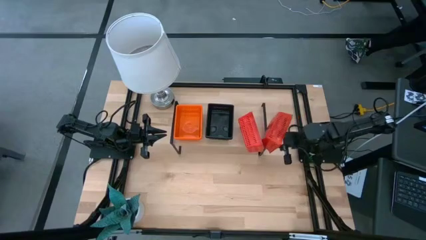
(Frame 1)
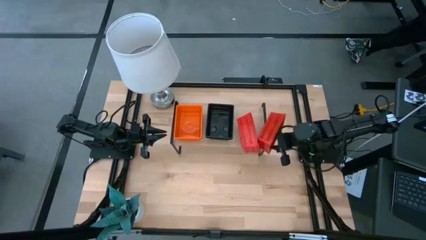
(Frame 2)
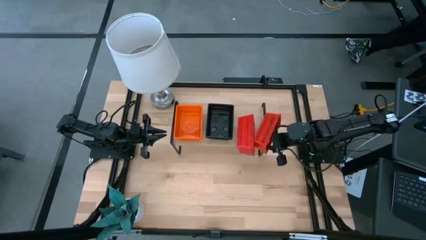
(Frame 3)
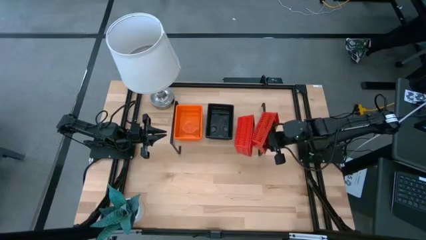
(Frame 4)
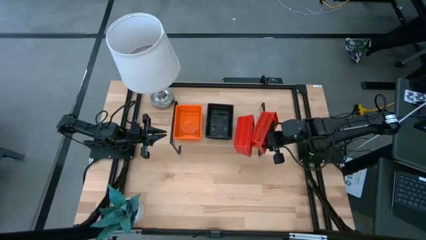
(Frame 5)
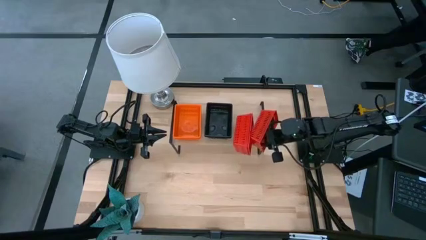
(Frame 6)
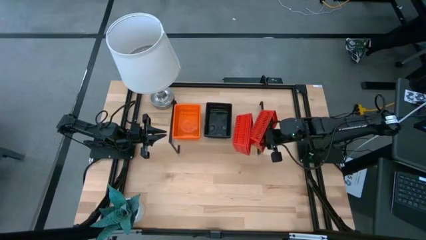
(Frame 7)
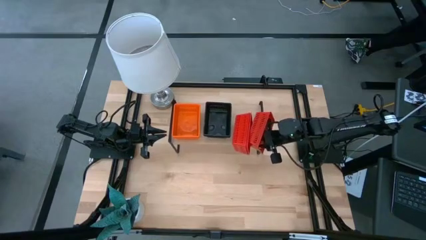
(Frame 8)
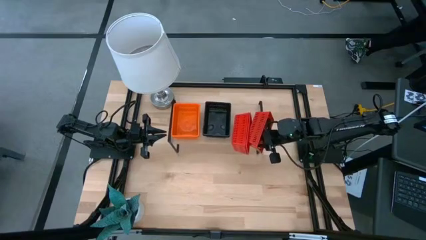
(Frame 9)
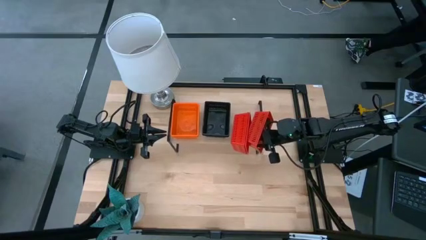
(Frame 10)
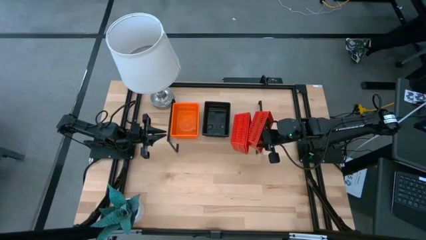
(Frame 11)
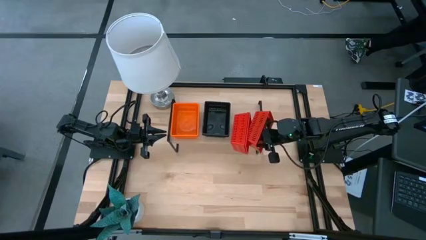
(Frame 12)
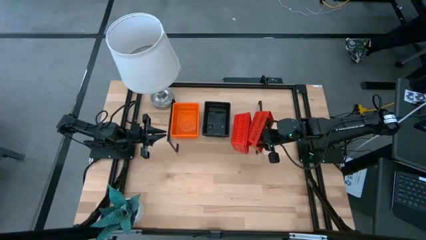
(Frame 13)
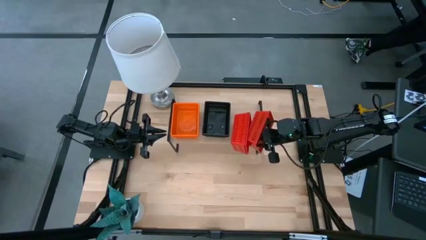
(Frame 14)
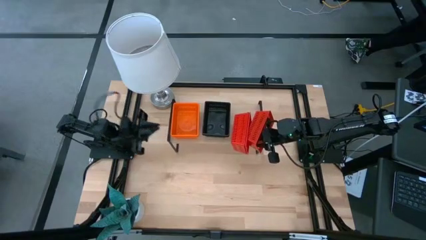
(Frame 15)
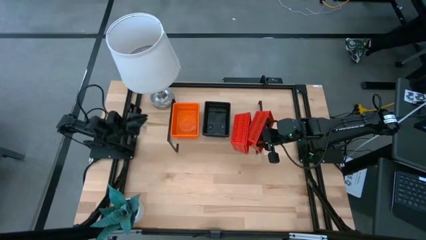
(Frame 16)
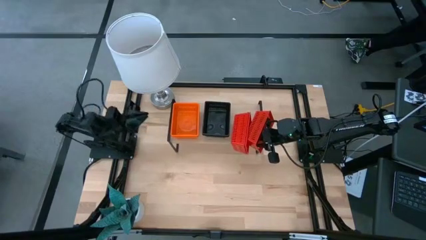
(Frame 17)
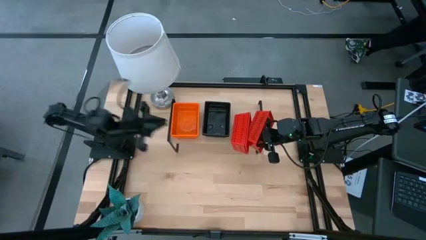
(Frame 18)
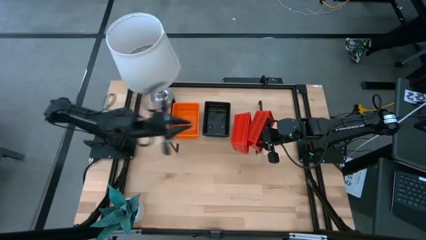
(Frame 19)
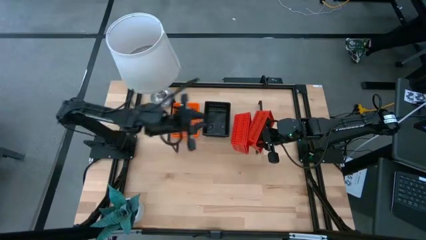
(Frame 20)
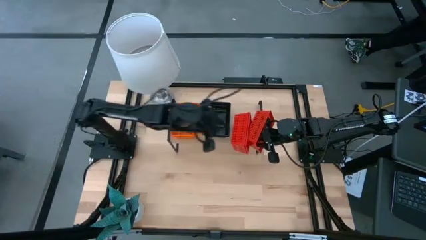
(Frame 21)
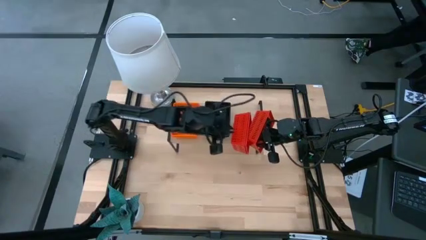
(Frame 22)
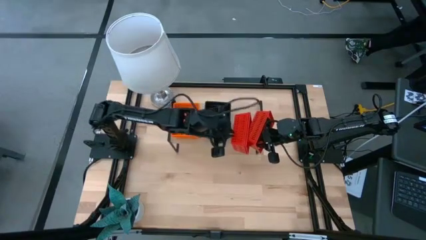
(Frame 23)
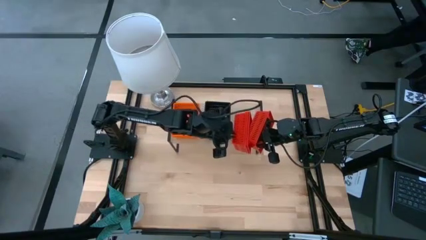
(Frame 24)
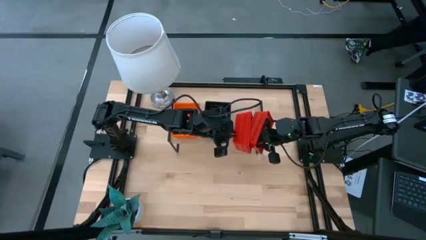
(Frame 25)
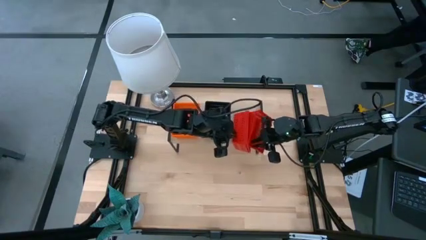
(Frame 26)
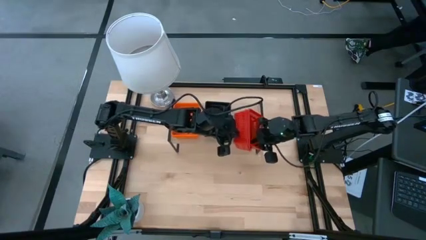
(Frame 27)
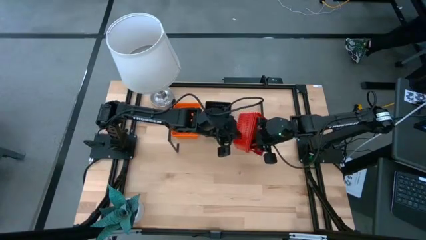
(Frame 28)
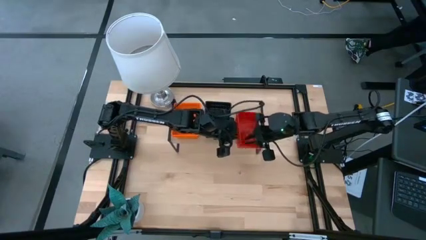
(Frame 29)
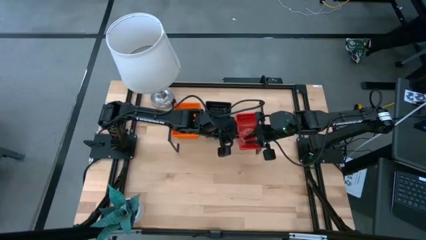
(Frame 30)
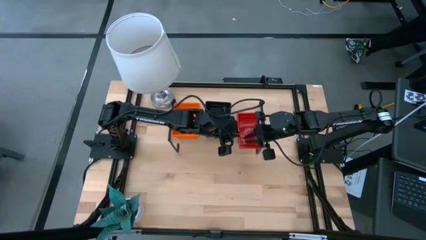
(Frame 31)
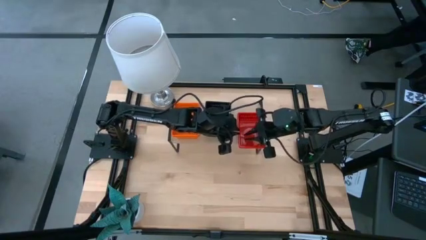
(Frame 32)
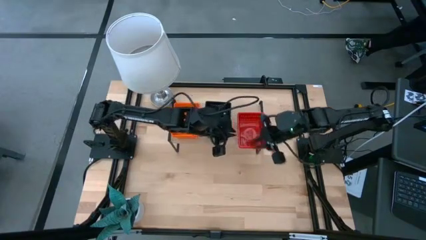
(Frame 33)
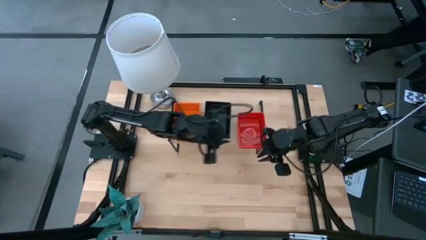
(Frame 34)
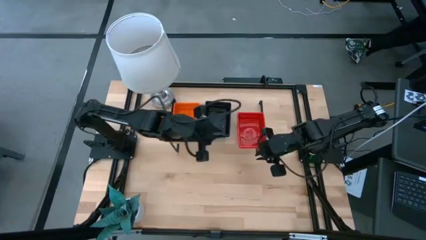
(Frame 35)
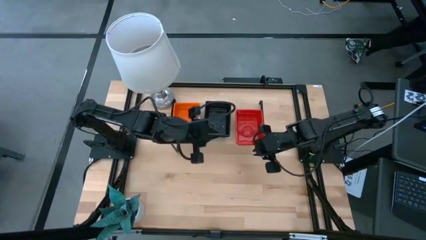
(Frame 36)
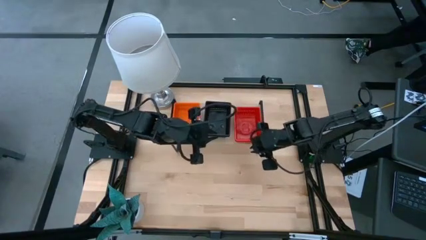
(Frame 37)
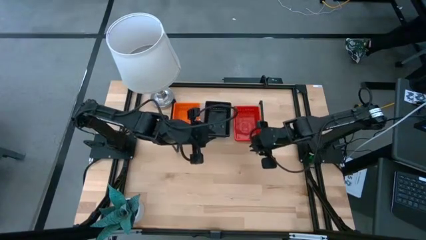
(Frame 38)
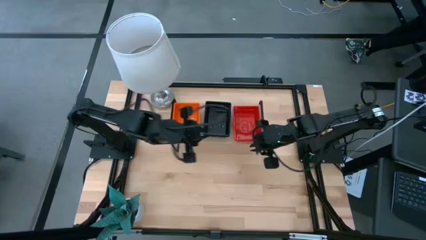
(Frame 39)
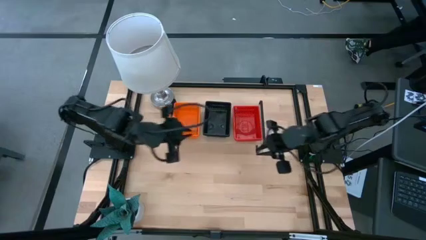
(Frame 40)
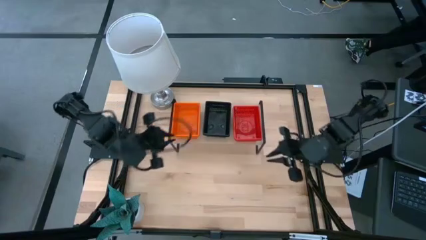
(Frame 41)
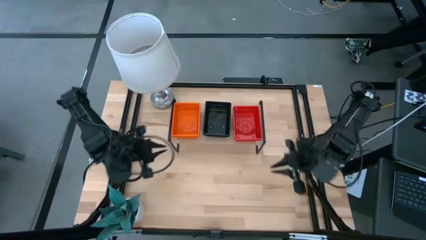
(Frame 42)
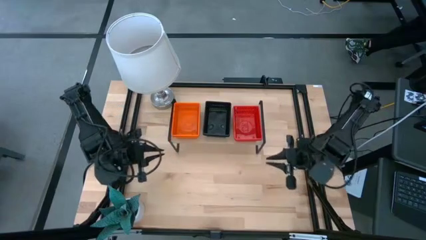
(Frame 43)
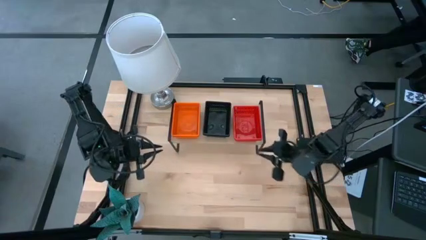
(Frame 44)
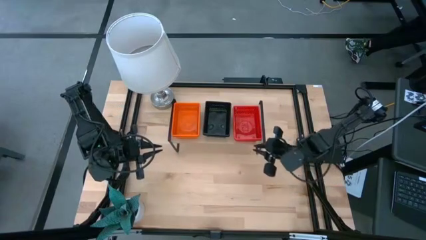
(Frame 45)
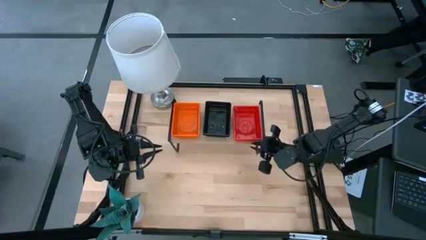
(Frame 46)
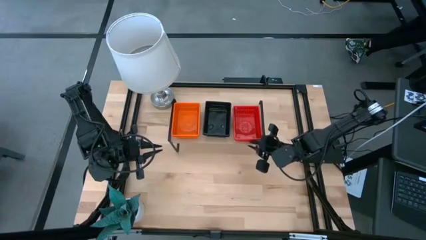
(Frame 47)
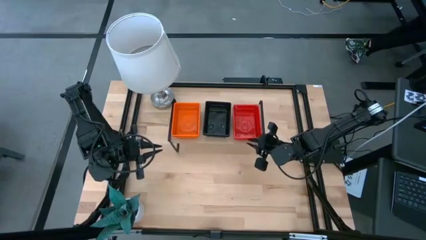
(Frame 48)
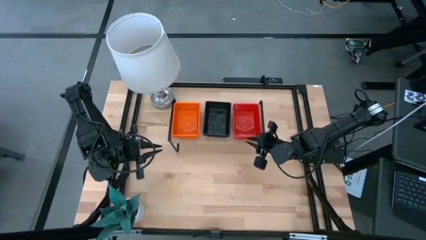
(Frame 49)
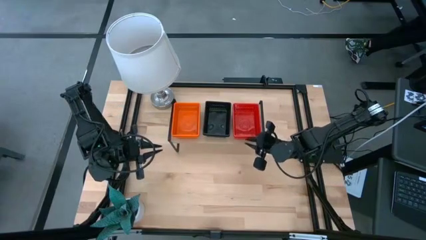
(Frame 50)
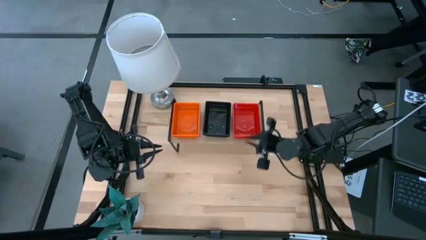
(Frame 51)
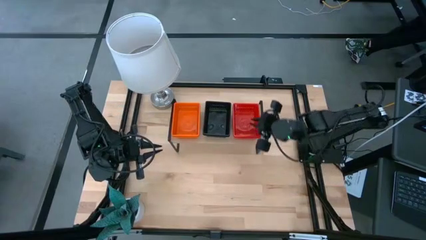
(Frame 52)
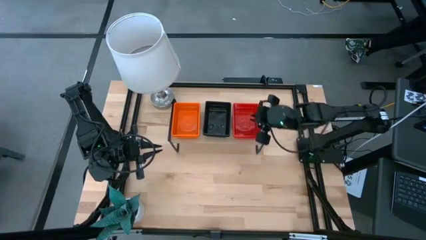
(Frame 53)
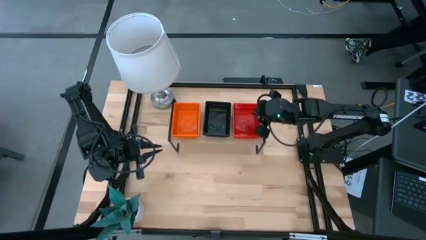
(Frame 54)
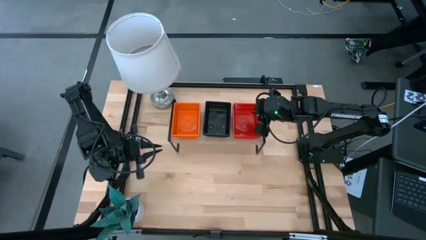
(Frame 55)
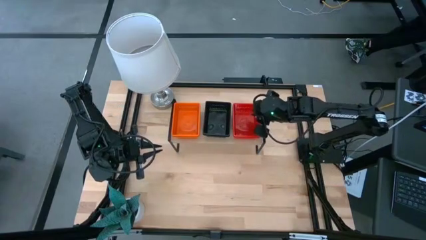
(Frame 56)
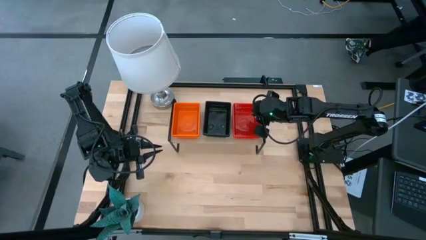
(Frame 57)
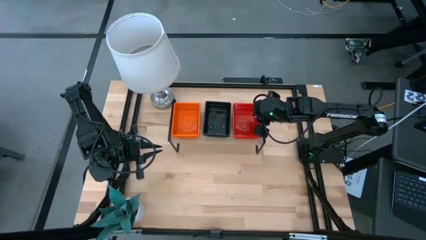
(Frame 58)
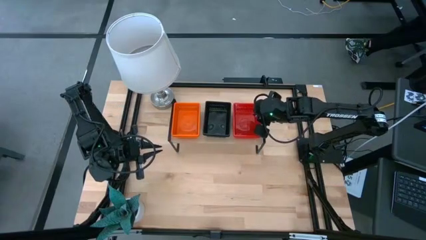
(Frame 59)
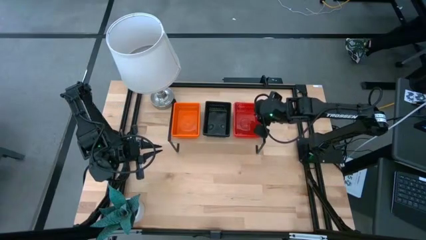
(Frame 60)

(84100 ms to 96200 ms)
Task: Stack baskets on shelf by color
Adjust the red bin on the shelf

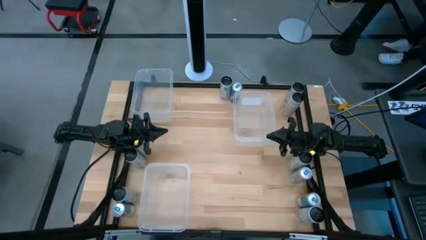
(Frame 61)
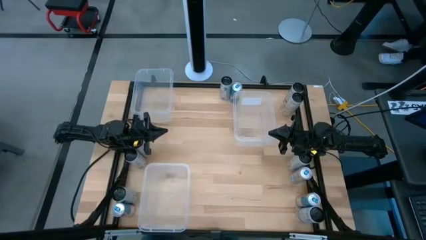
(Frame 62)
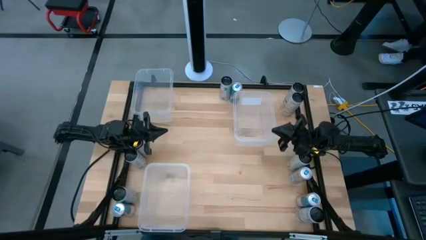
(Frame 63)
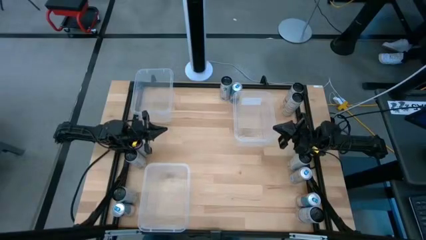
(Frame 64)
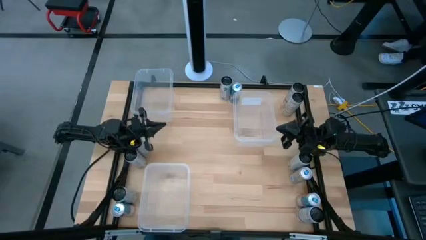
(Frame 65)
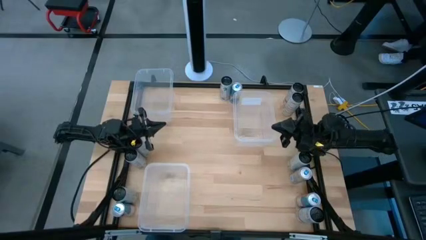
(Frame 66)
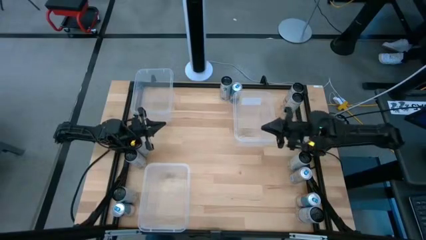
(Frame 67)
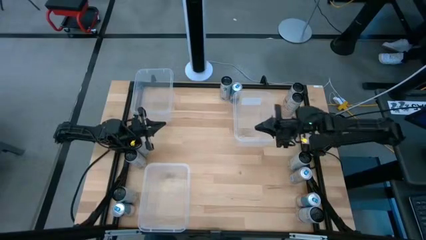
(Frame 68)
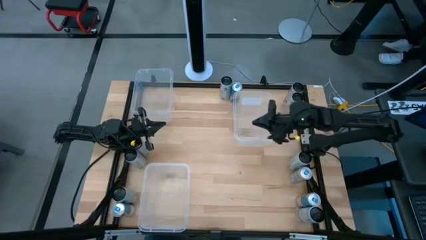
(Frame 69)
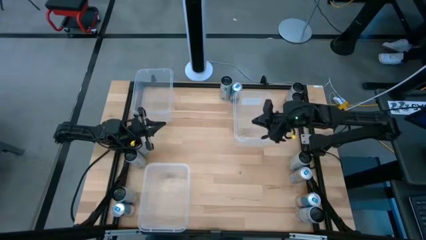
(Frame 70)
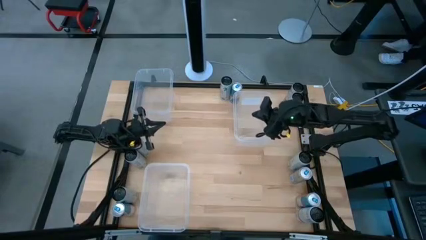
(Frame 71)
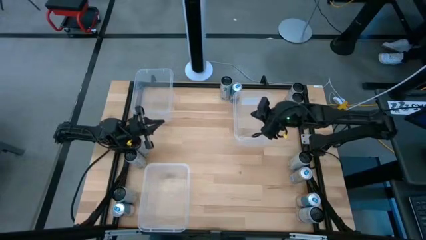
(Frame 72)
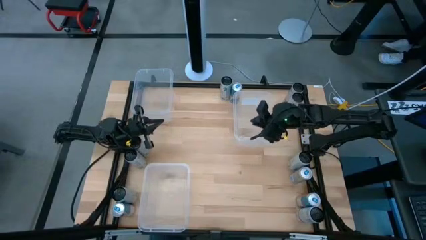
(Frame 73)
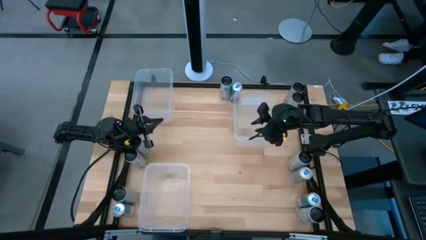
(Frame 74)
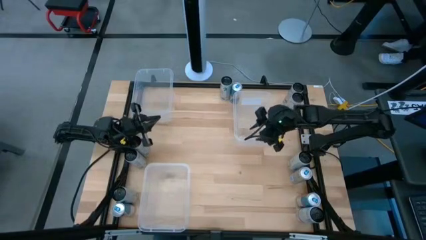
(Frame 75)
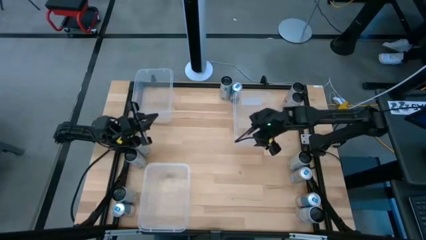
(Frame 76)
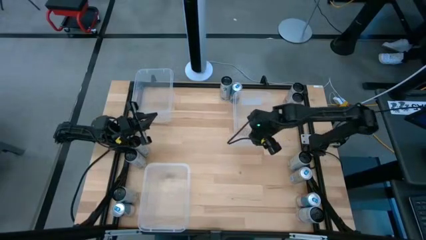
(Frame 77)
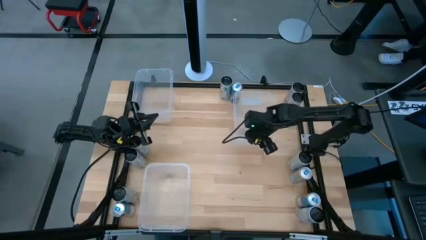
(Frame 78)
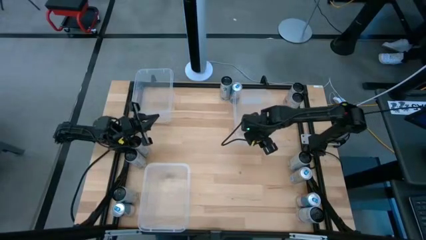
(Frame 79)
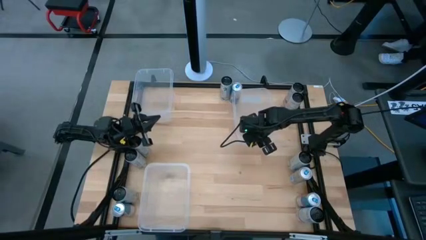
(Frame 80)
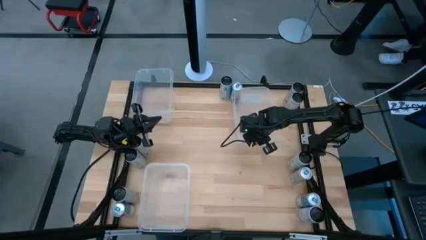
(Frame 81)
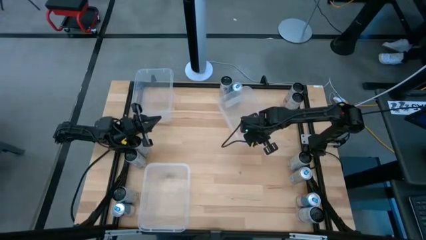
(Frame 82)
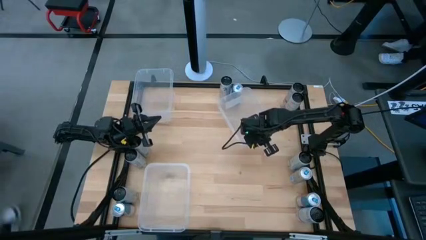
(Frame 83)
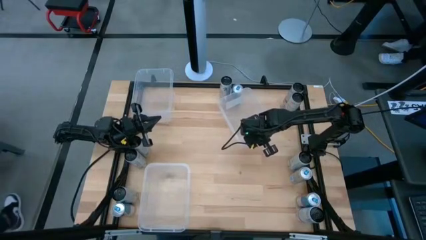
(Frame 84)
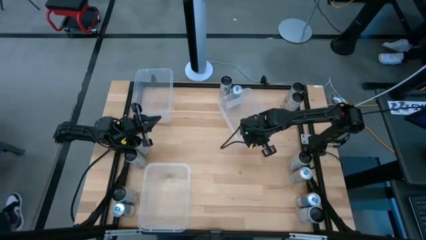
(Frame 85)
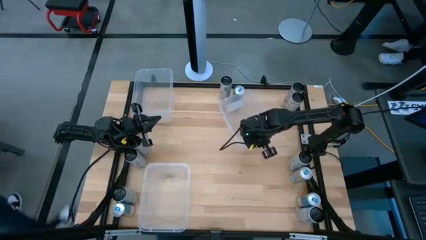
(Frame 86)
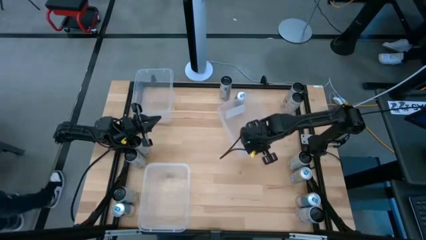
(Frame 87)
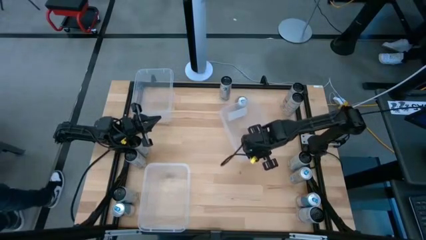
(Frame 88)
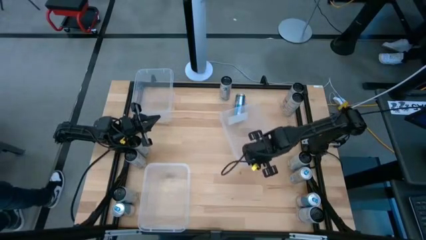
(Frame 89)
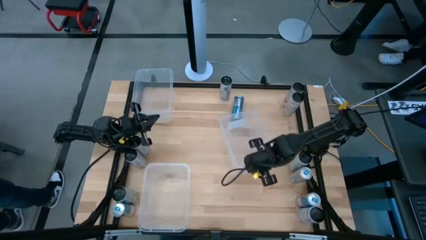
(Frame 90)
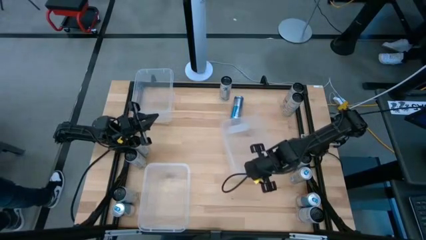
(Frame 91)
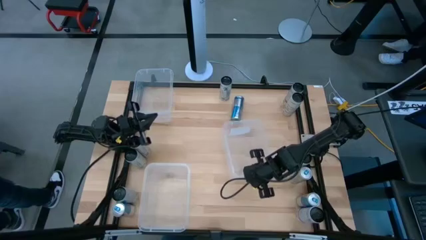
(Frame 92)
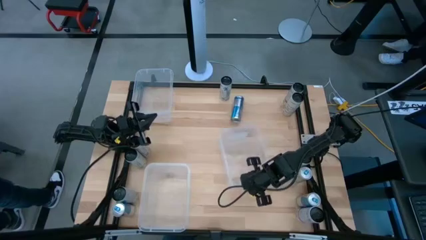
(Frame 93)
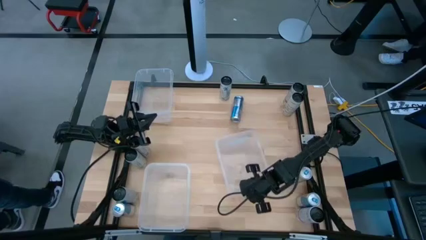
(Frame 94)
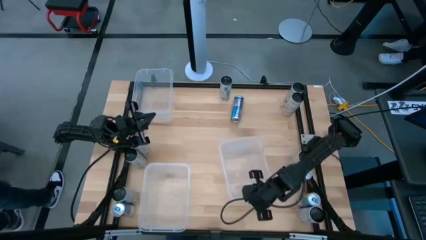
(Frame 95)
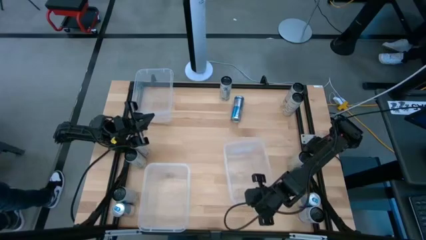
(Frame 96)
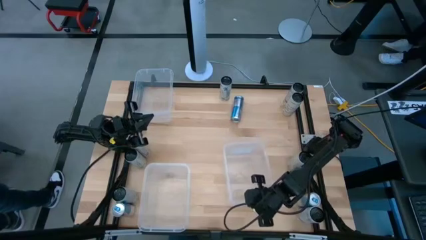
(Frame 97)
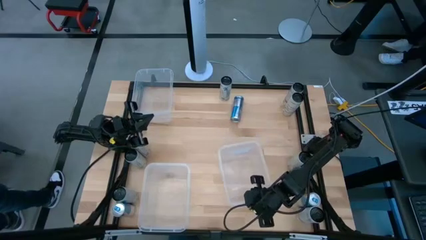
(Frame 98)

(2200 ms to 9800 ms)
Task: Sort soda cans
Move the top right transparent bin to the bottom right of the table
